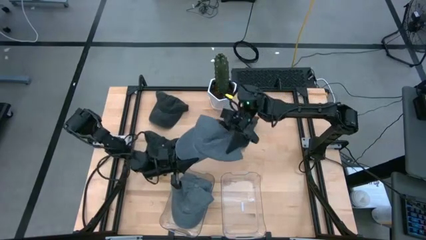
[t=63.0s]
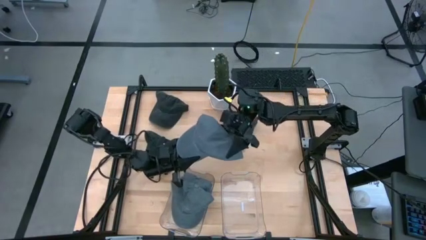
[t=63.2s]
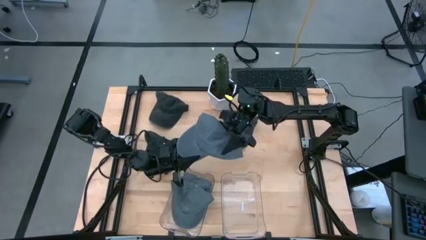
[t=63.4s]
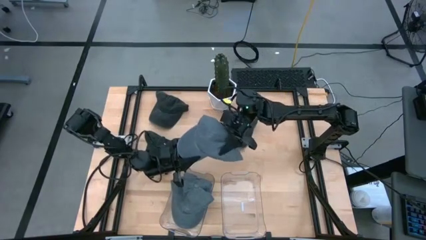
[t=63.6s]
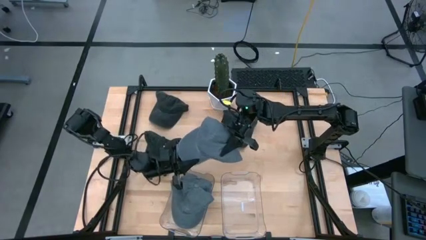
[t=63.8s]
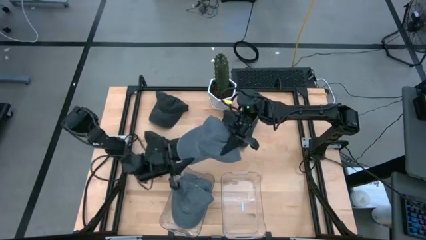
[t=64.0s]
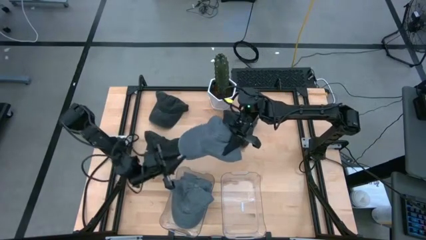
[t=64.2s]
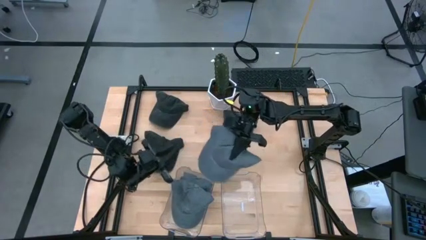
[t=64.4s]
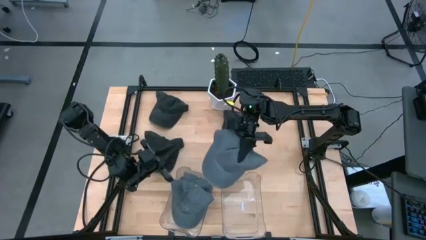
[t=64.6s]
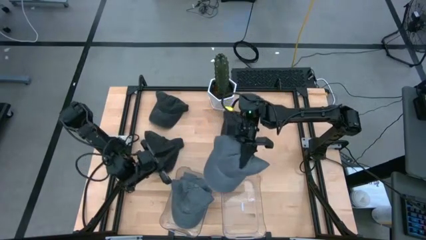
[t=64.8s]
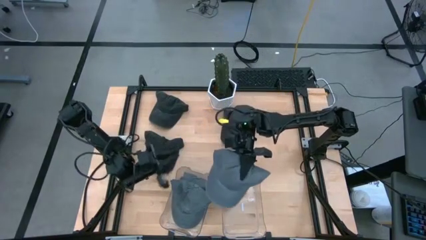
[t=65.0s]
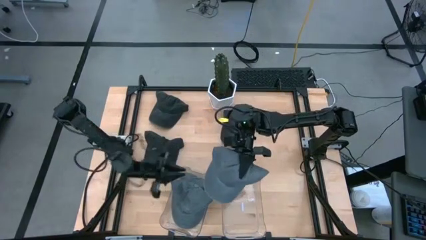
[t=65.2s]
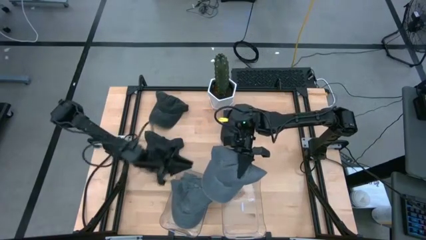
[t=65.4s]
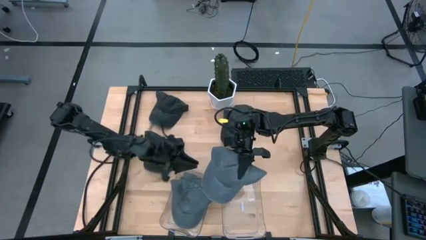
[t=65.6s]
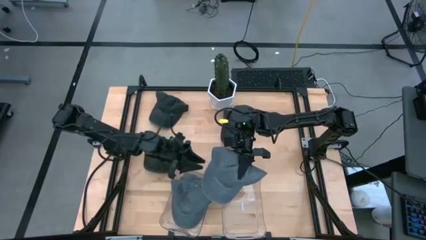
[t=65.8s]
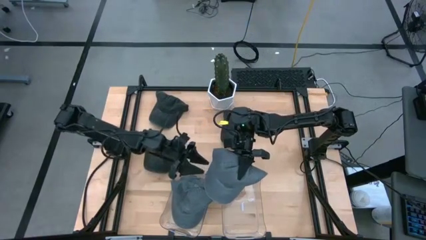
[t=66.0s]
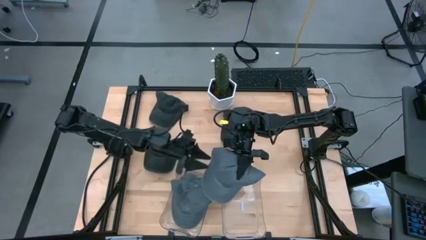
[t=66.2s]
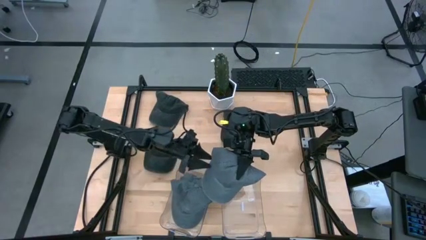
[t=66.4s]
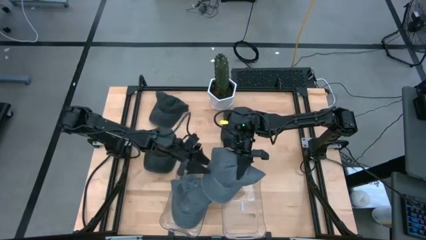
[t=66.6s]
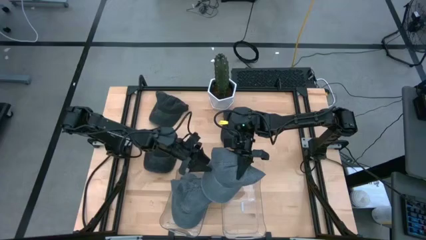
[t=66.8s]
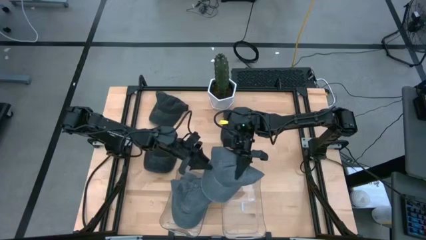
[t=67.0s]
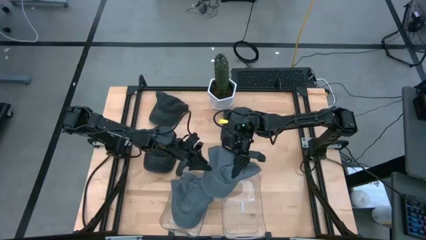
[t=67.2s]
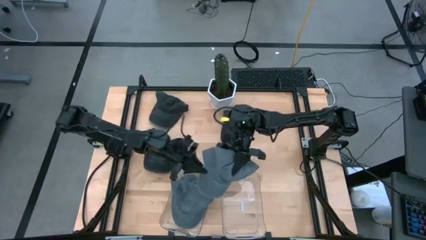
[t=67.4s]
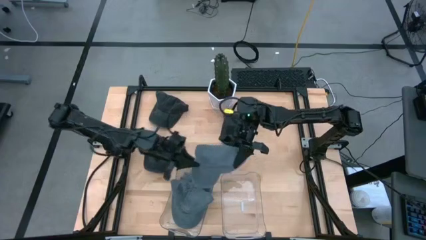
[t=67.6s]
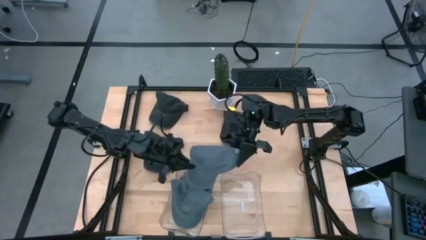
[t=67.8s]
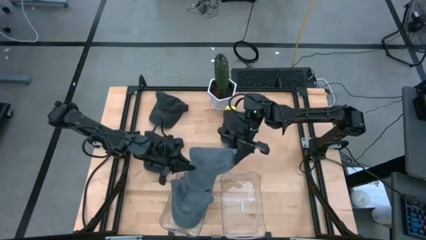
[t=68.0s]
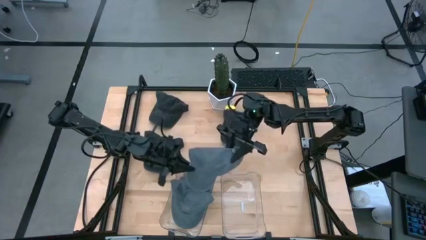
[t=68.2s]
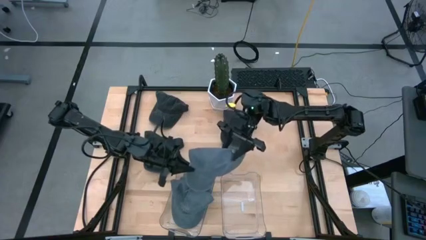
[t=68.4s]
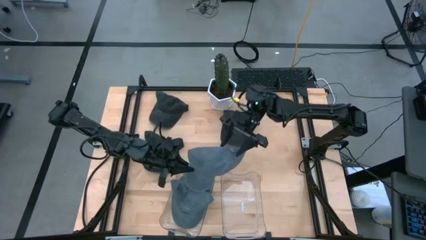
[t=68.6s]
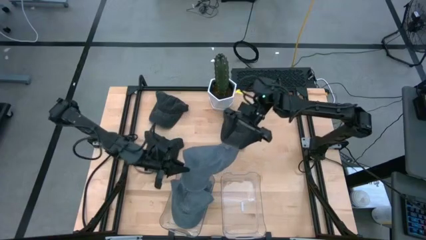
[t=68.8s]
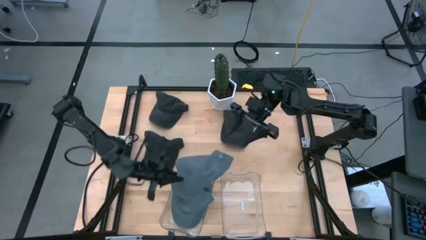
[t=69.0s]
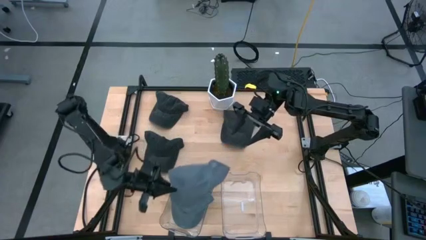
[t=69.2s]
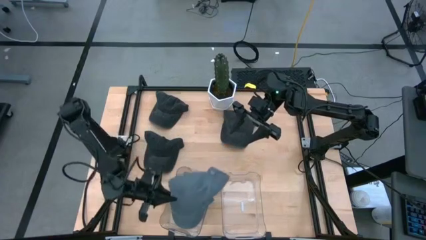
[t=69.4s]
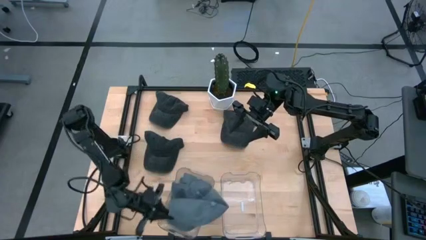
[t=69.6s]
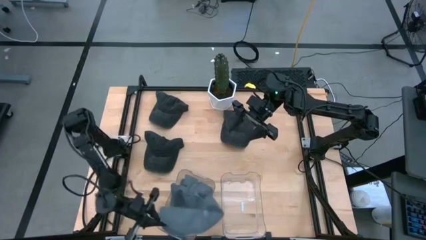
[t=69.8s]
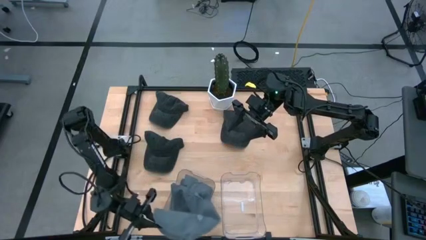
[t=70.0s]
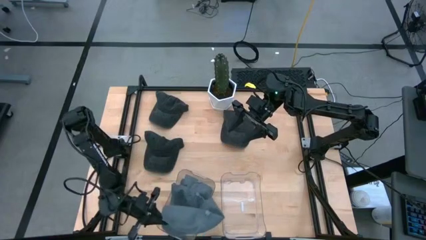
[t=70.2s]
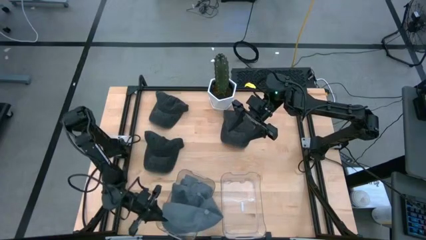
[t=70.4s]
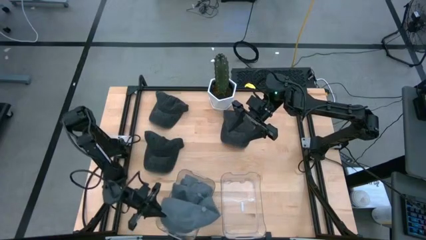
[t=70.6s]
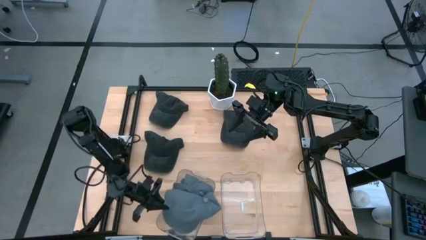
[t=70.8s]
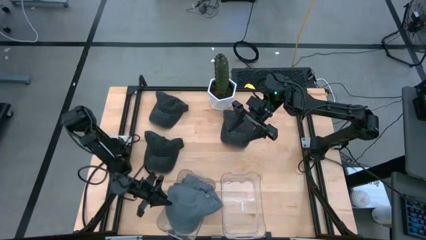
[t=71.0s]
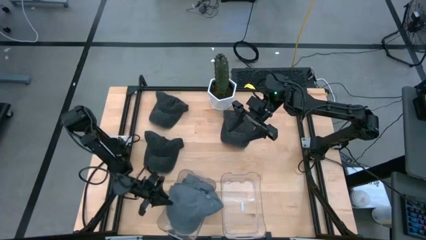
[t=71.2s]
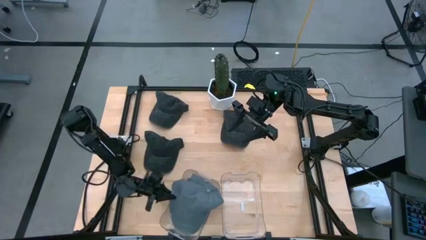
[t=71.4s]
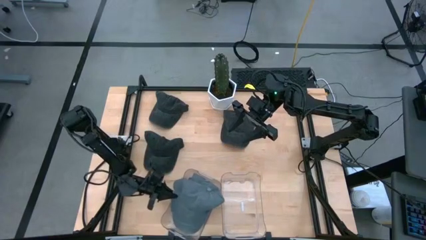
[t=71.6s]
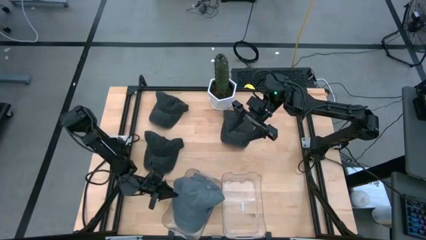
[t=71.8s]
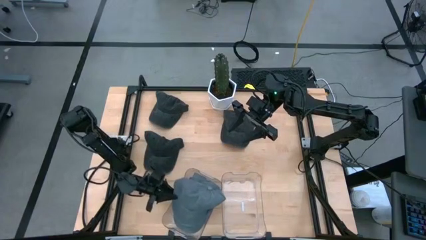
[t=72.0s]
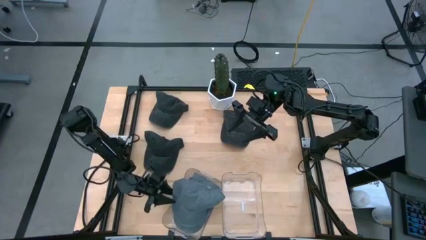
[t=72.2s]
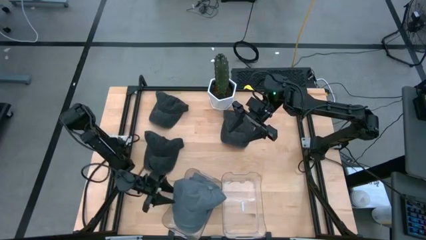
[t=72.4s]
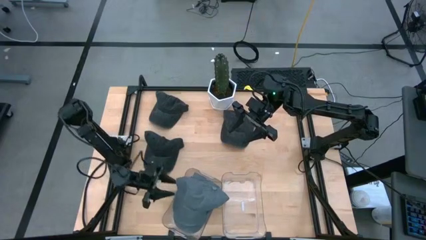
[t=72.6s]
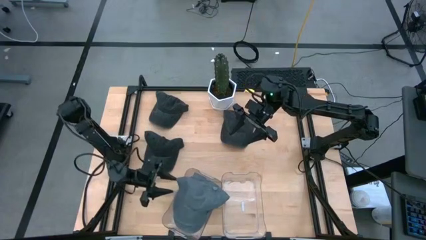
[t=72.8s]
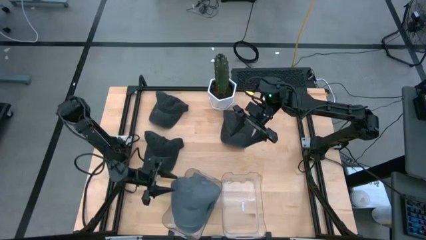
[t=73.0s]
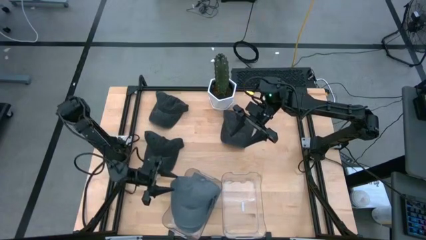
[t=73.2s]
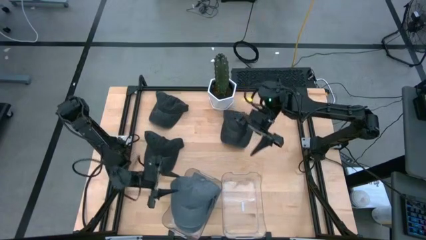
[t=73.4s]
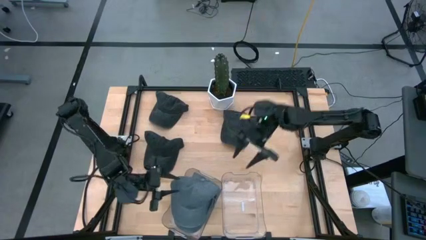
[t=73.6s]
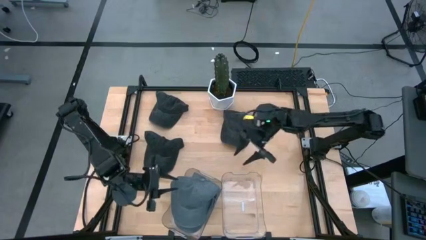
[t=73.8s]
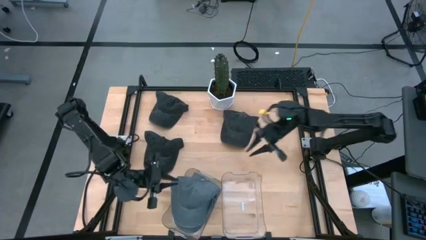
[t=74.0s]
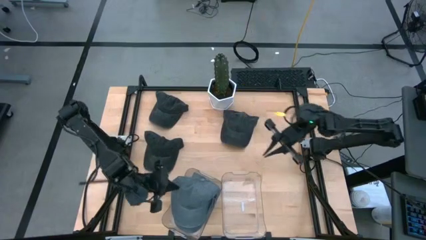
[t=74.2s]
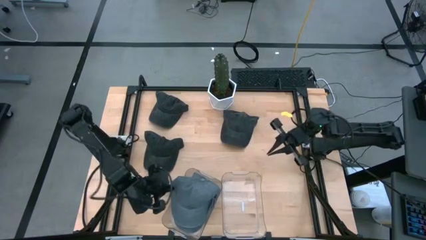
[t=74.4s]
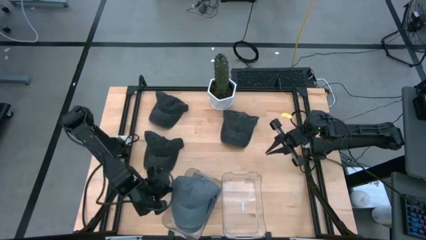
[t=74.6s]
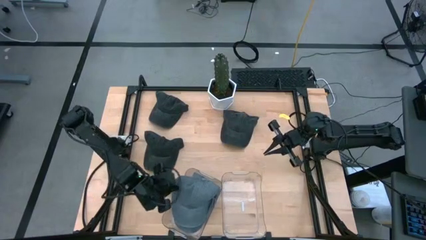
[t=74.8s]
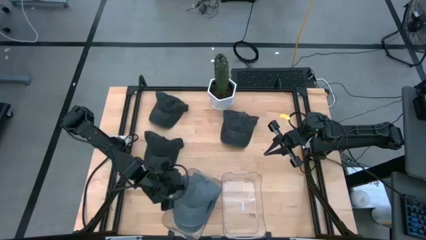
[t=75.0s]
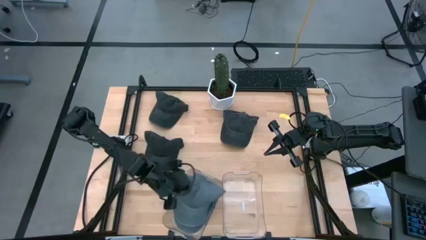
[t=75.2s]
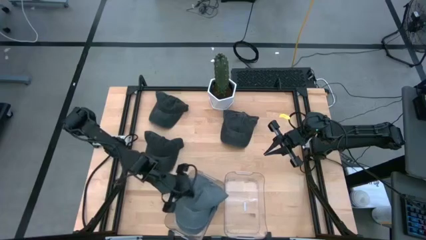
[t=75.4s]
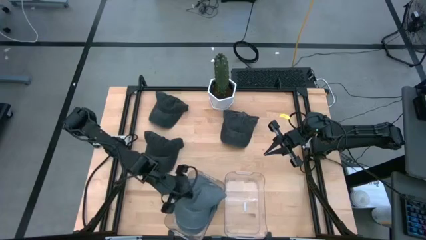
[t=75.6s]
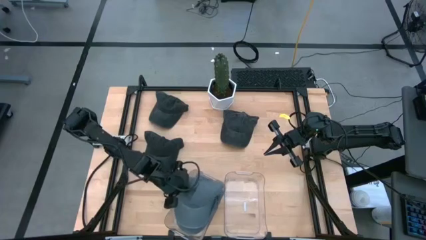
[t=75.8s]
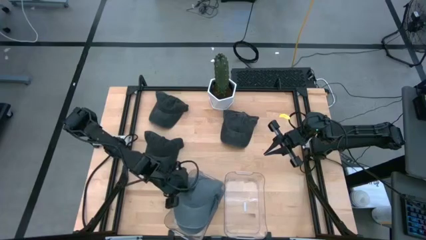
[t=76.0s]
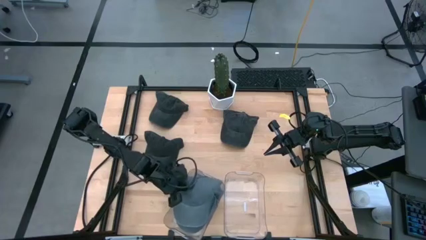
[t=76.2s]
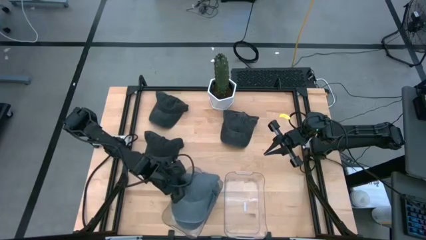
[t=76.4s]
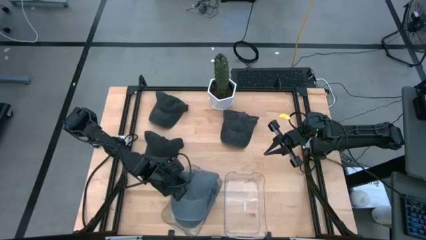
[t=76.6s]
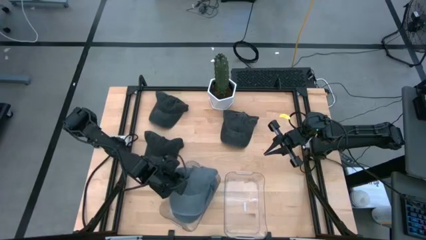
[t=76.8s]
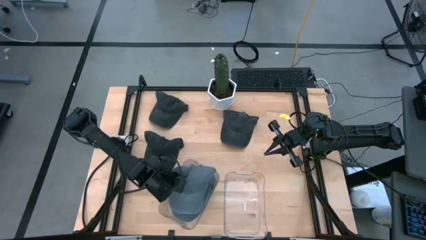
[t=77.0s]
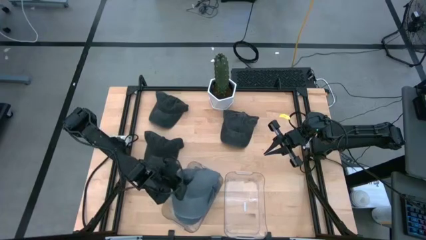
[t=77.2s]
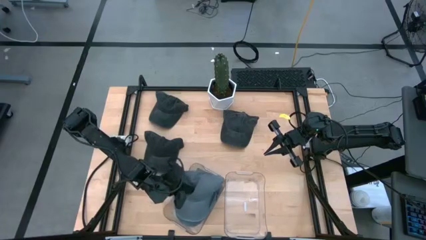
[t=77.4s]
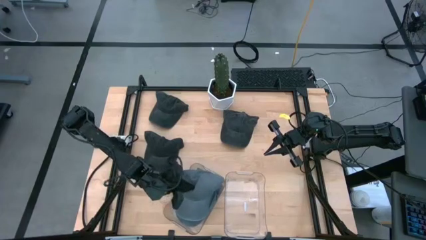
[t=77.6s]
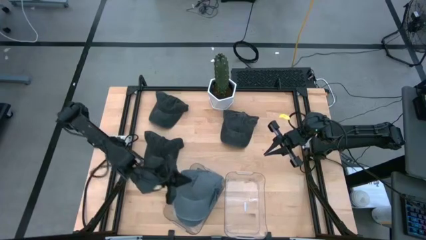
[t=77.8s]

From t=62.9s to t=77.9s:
Task: Pick & Place hat
Put the gray cap into the left transparent bin
